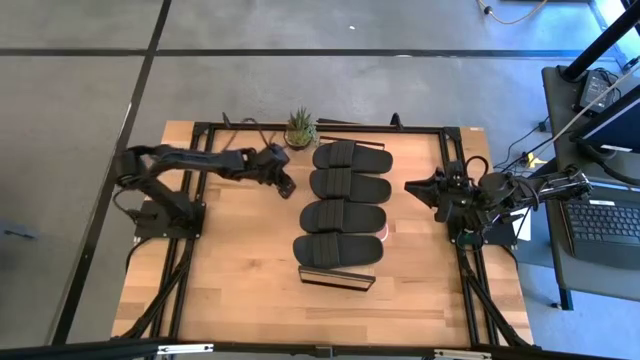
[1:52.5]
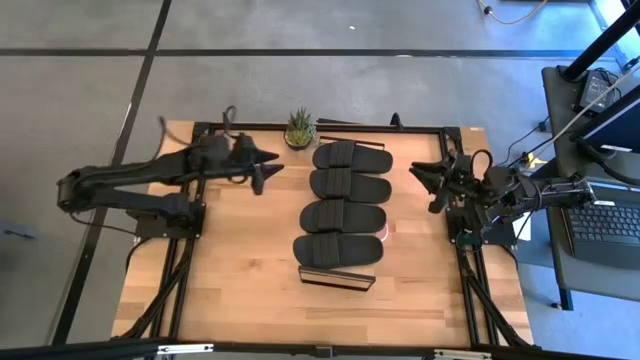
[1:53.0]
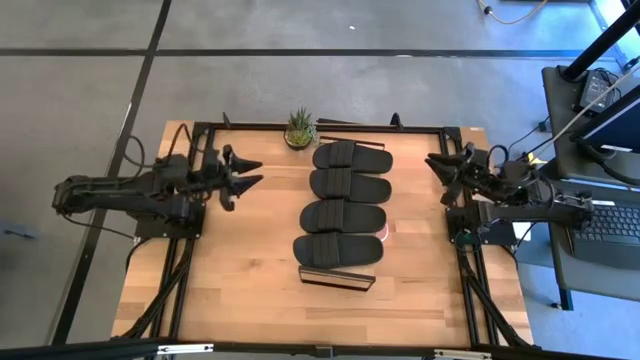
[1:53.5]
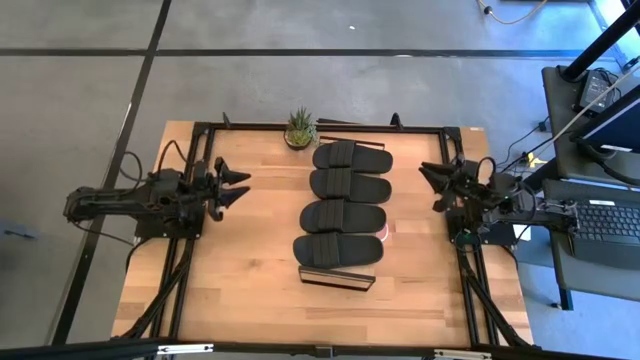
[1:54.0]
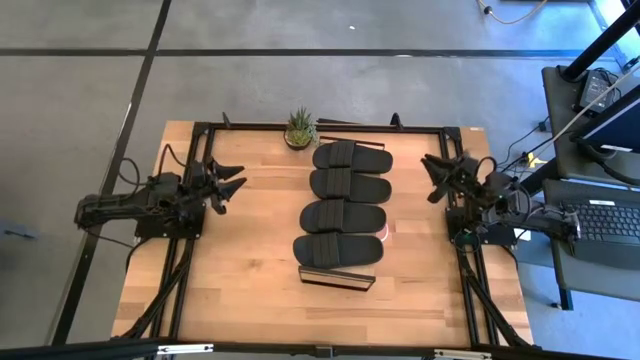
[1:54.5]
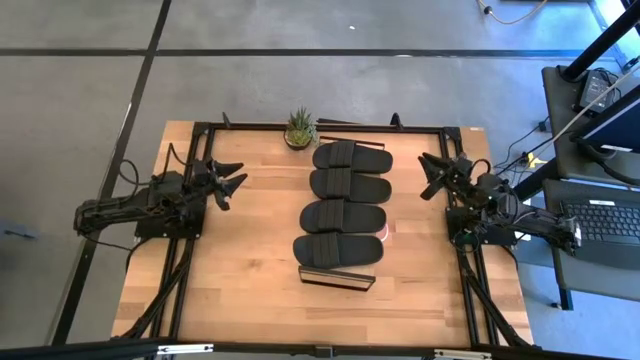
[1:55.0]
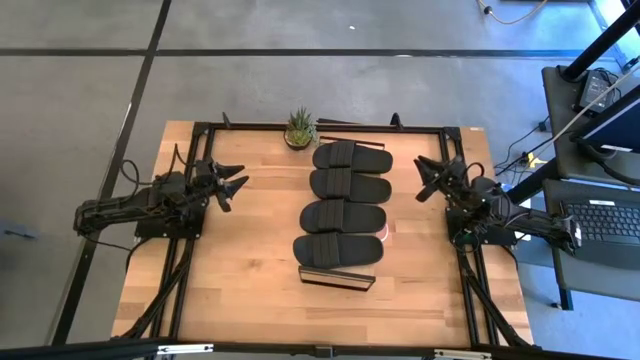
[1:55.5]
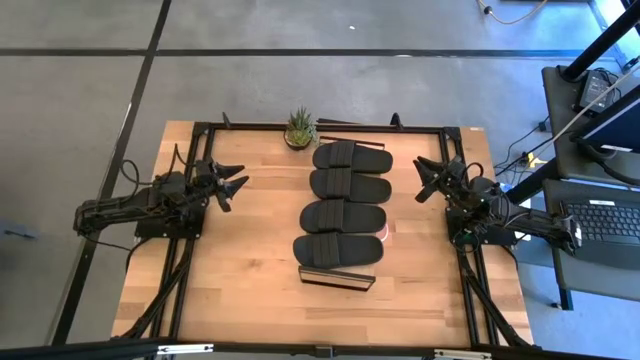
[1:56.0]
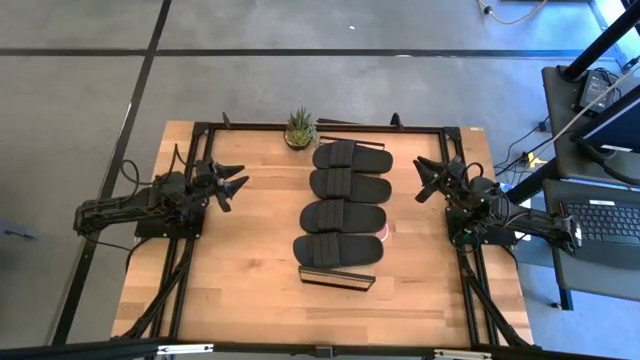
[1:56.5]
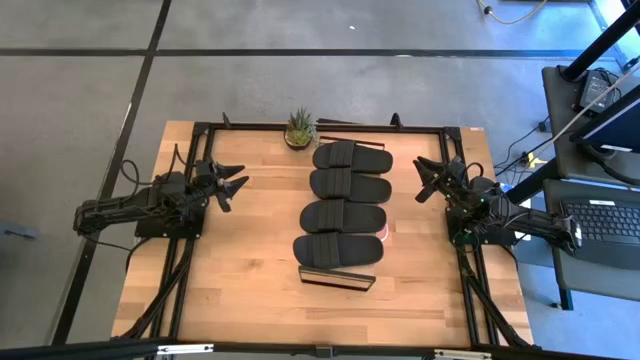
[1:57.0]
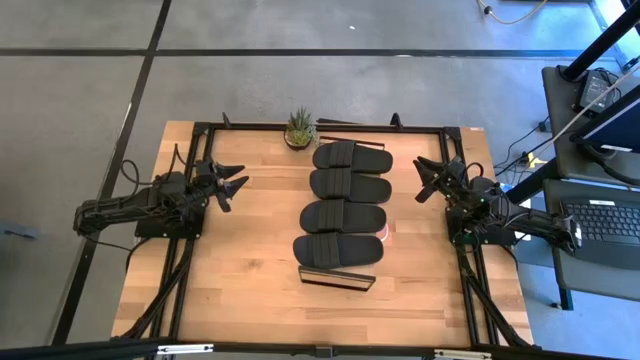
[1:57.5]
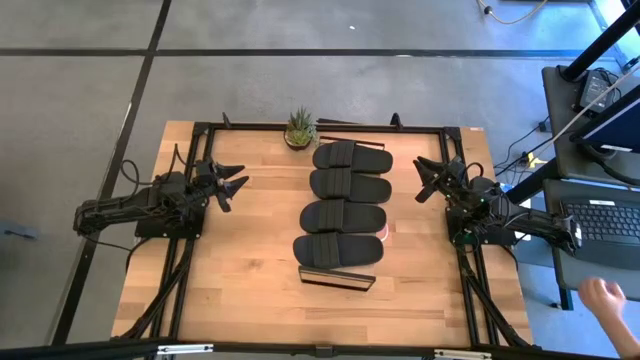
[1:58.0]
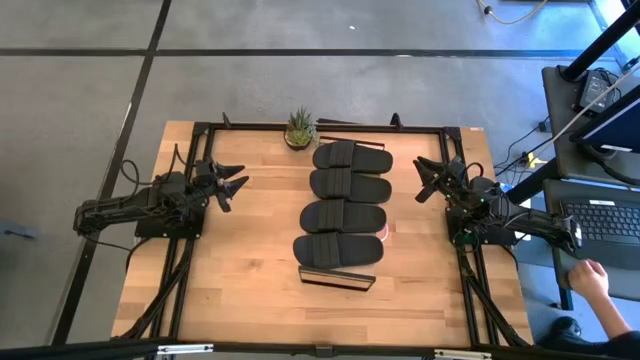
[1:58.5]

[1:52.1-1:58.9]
Task: Pick and place slides into the shelf
Return to Home Position

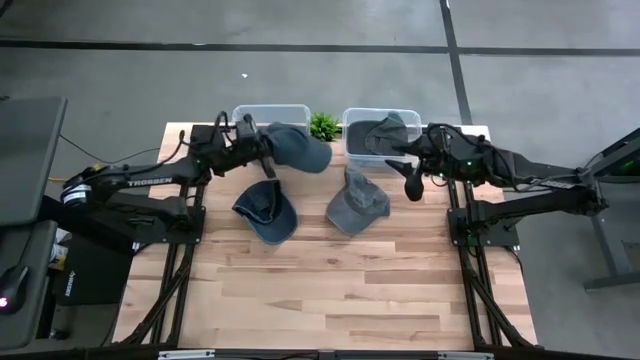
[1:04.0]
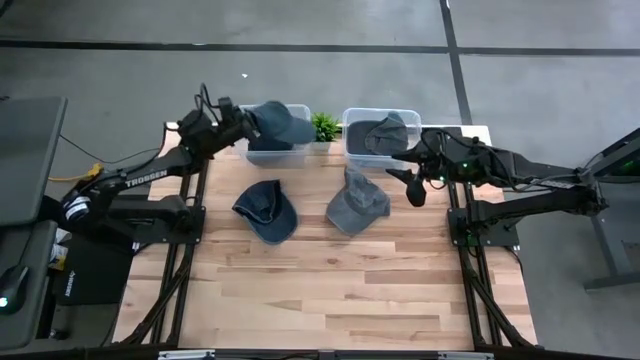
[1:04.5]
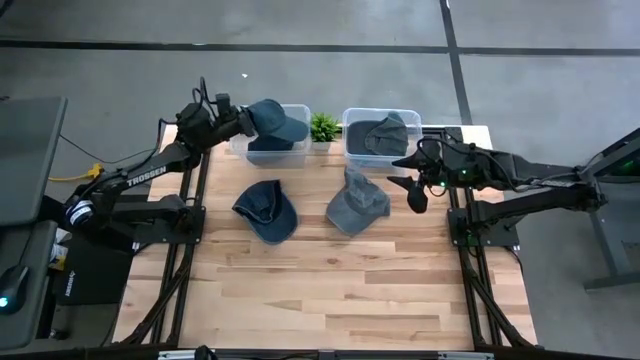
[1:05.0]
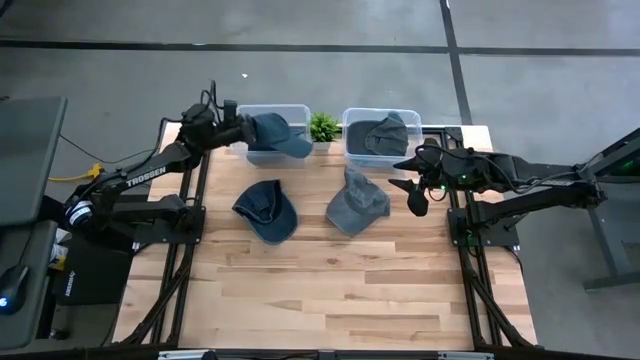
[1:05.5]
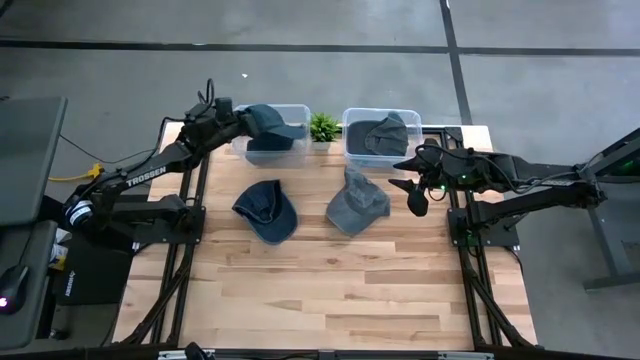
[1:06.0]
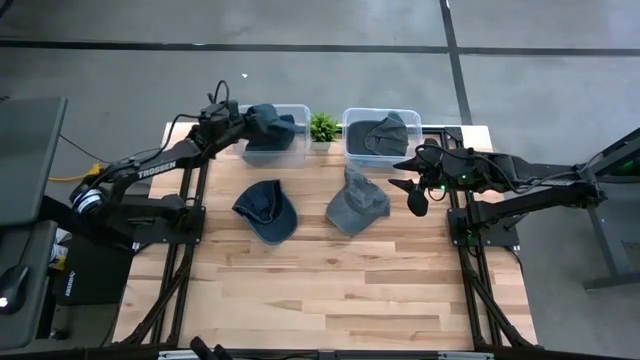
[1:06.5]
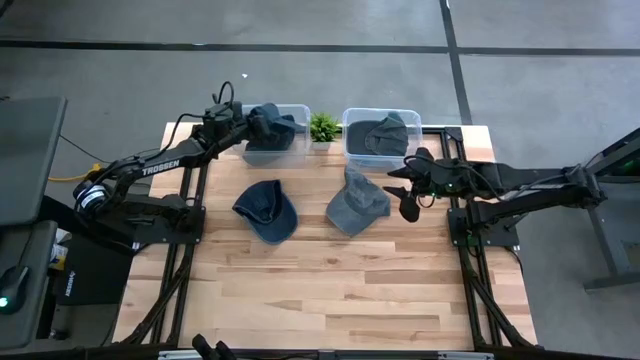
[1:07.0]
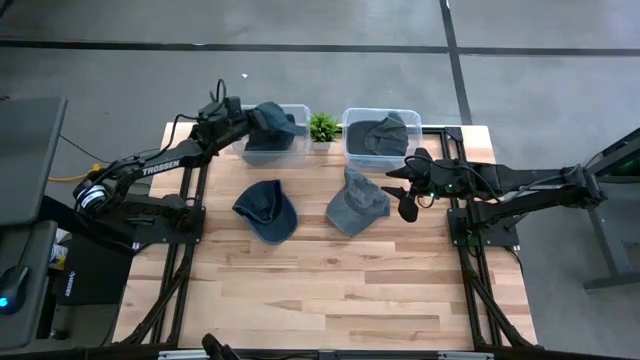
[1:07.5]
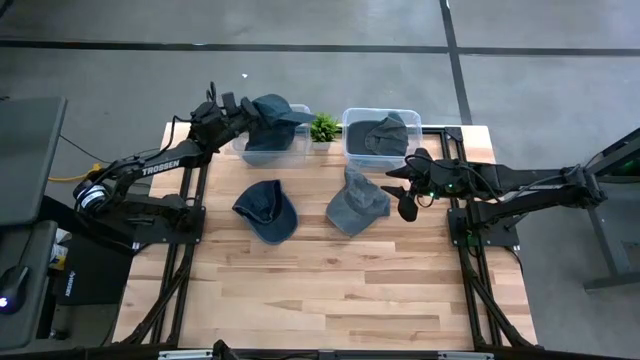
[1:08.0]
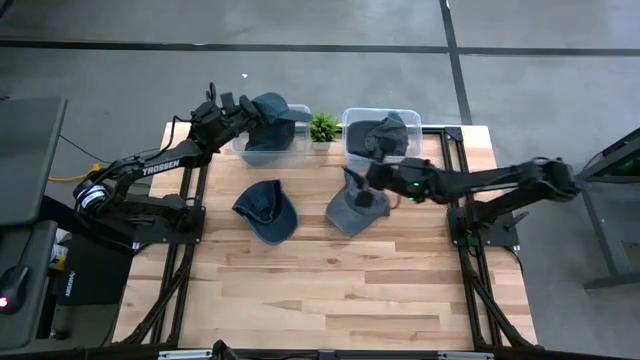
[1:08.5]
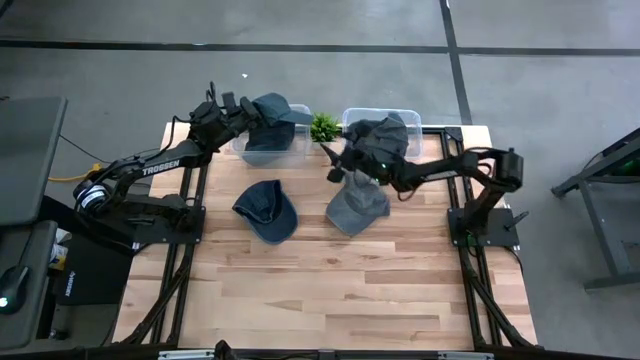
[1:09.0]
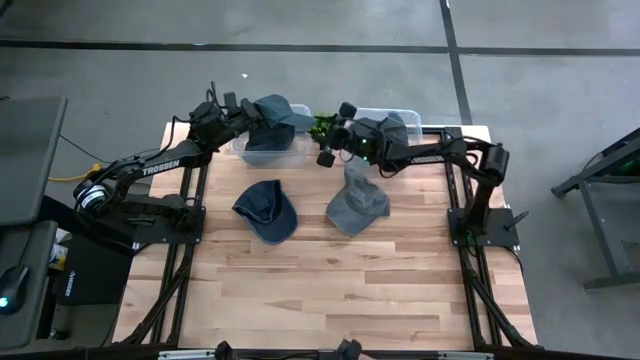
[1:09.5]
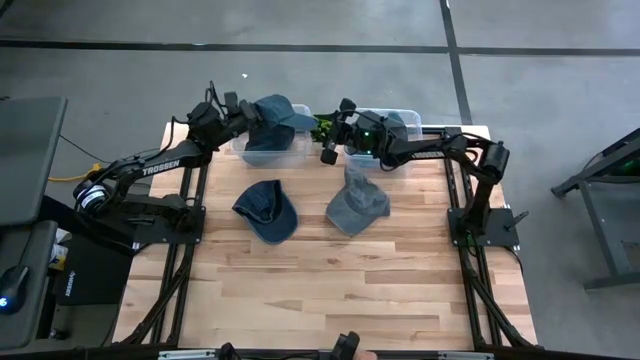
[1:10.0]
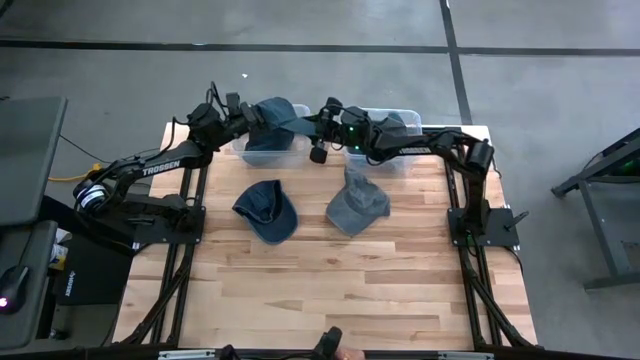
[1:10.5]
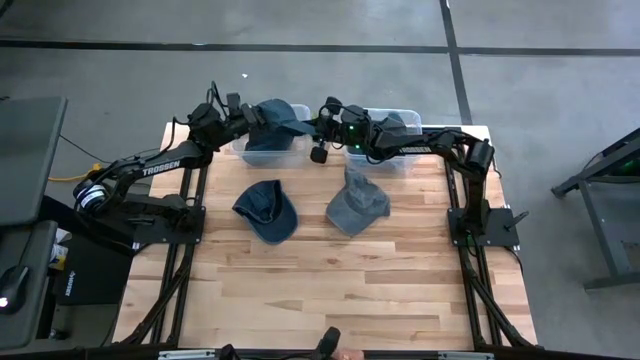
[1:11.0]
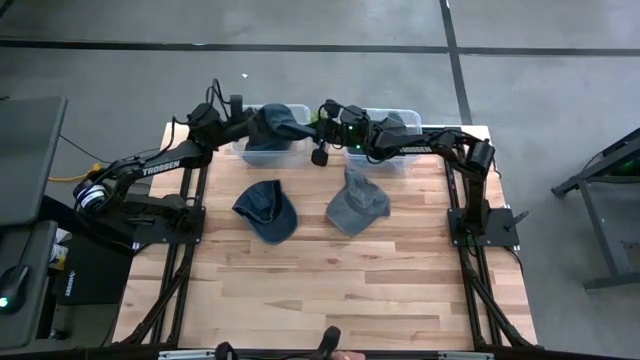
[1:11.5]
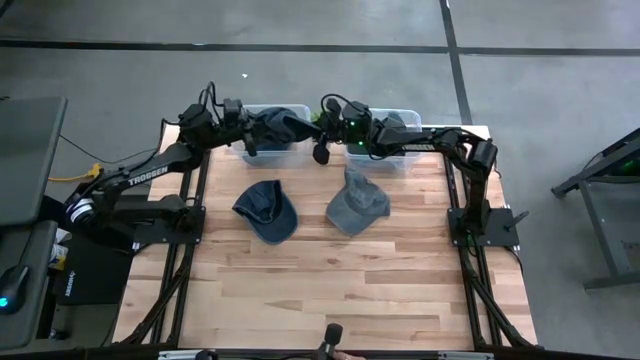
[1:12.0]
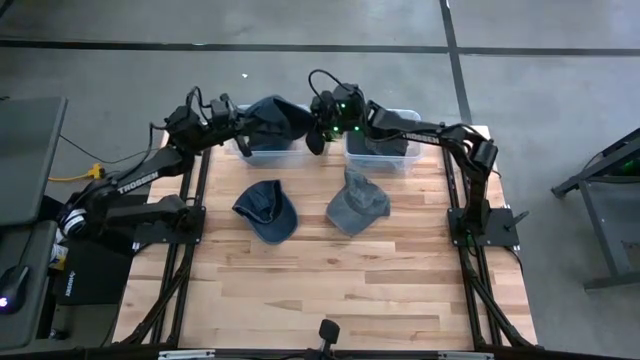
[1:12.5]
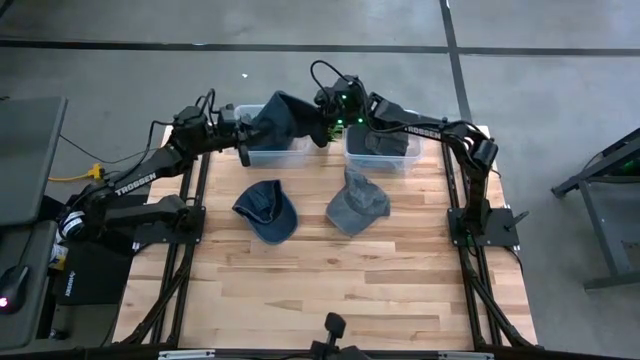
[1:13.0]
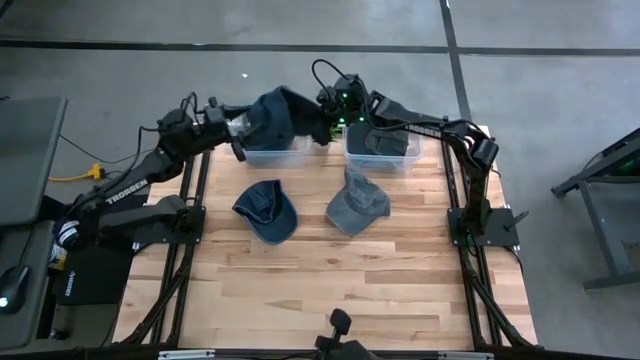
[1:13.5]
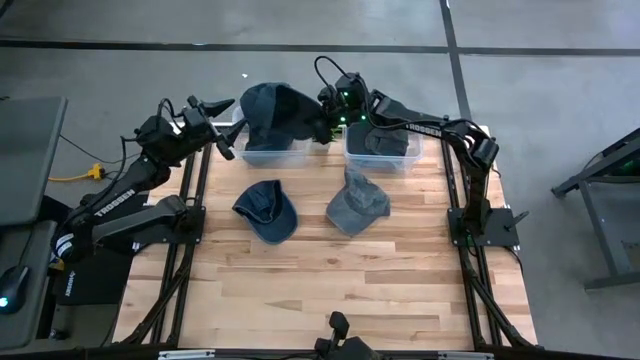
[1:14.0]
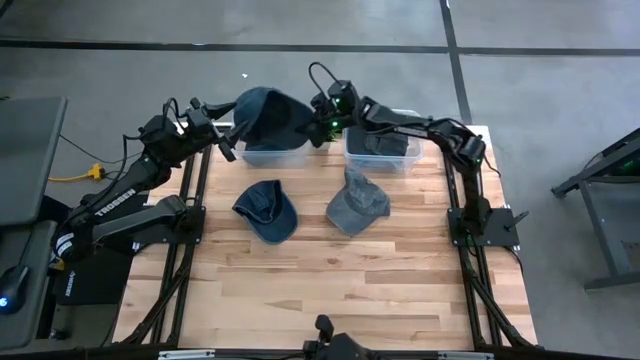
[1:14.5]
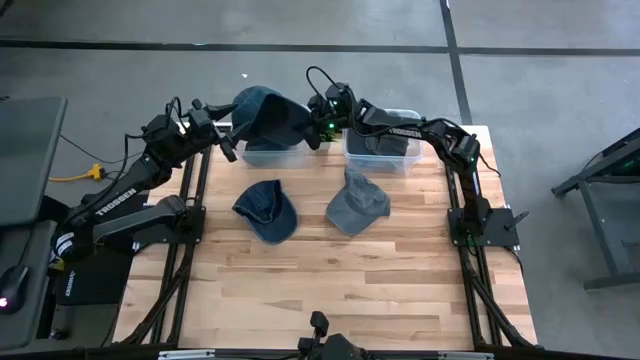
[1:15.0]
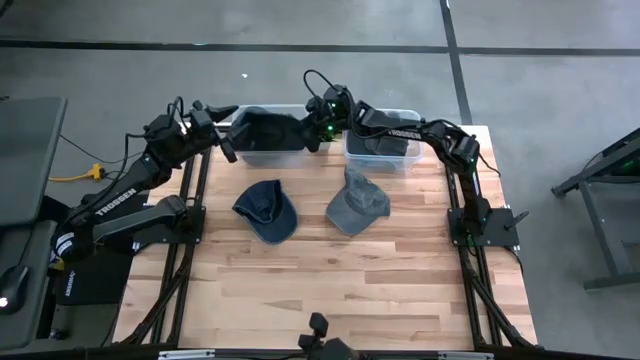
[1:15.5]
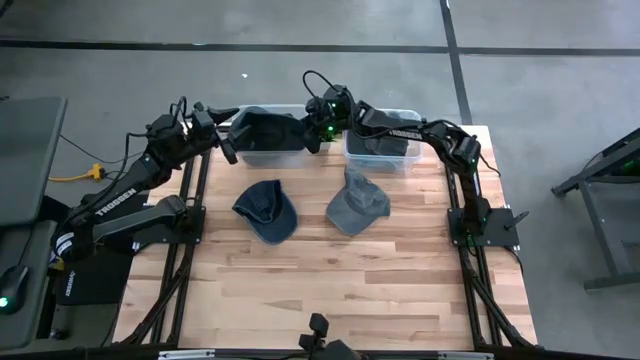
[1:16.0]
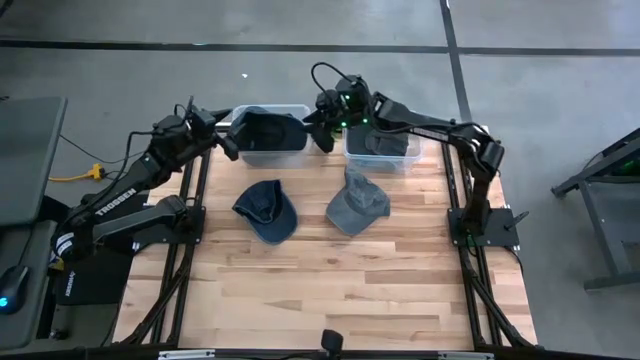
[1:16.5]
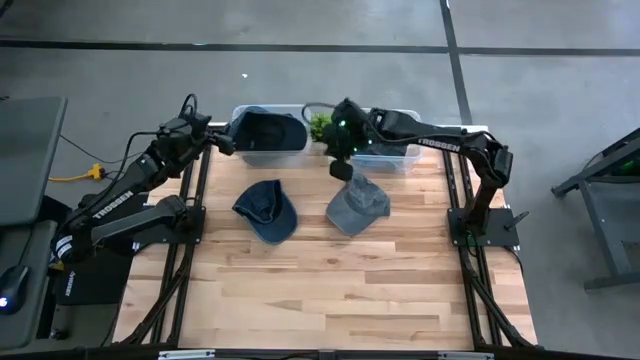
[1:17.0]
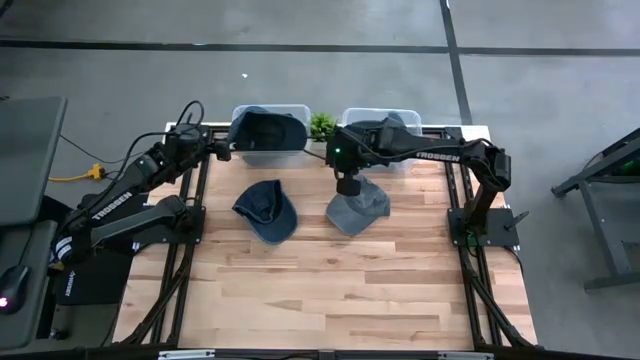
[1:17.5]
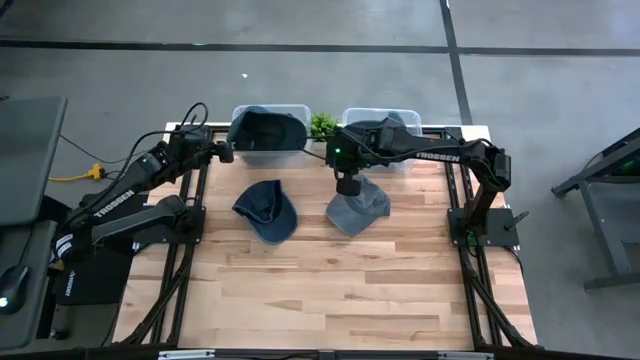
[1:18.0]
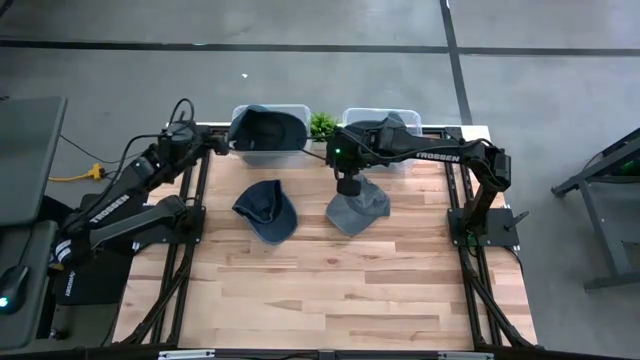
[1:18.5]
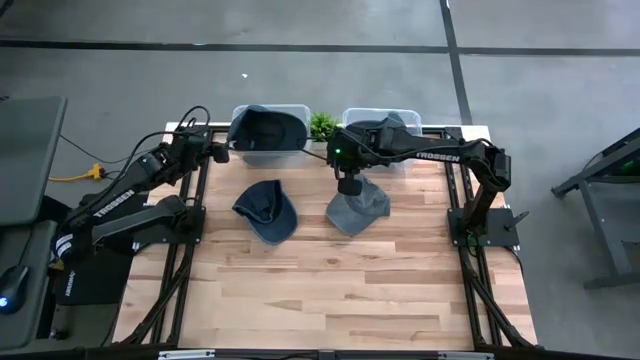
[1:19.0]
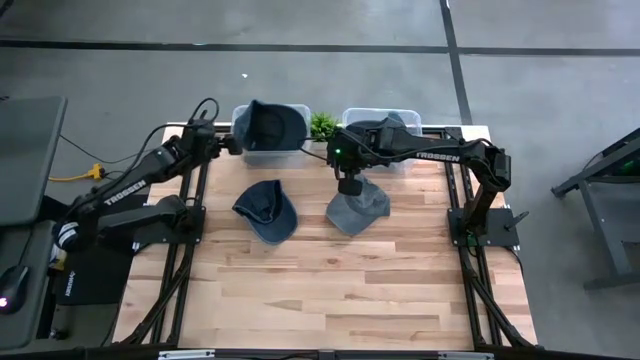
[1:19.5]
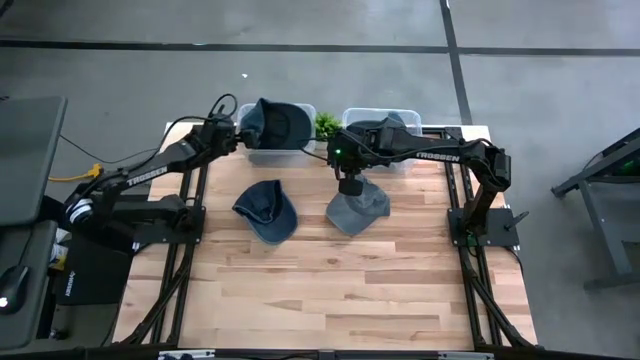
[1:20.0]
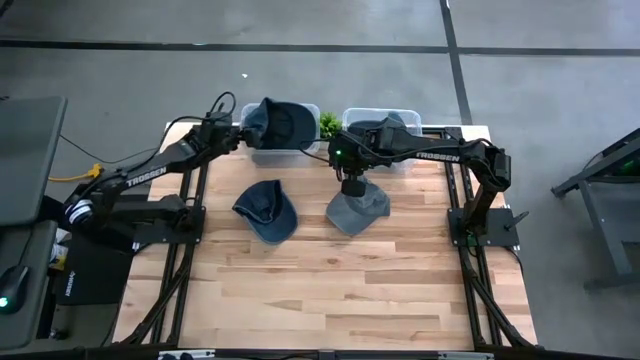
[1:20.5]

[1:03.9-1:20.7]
Task: Pick & Place hat
Put the bottom blue cap into the left transparent bin
